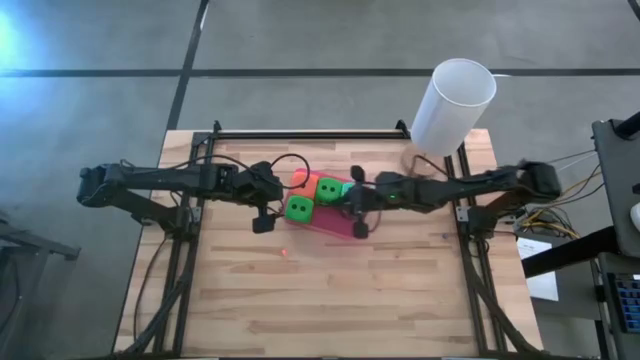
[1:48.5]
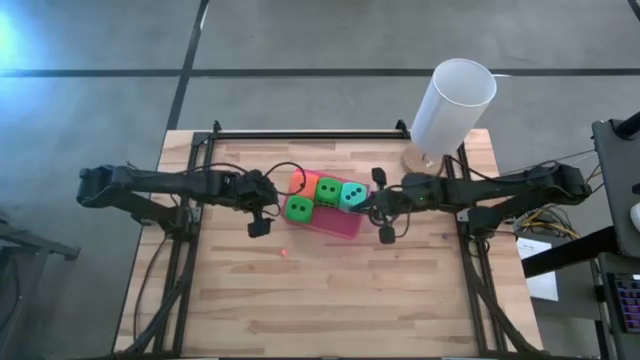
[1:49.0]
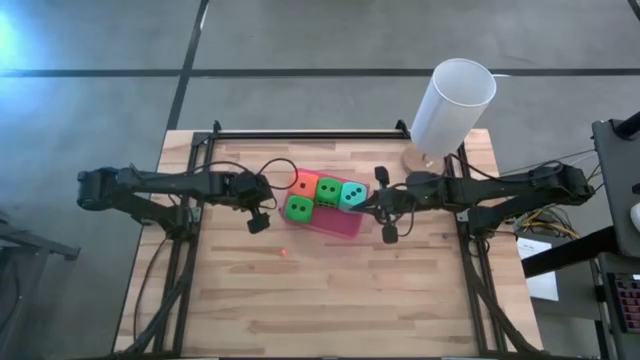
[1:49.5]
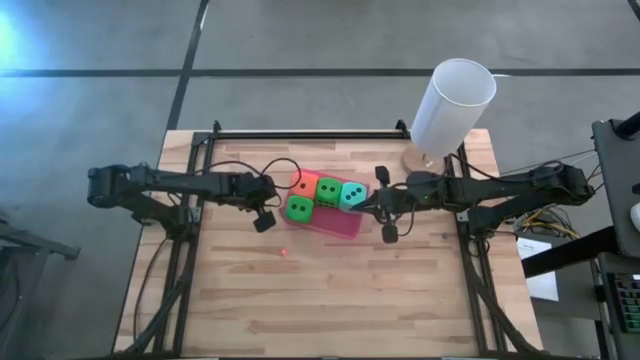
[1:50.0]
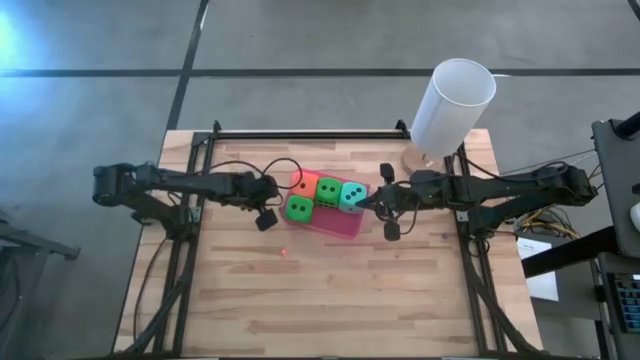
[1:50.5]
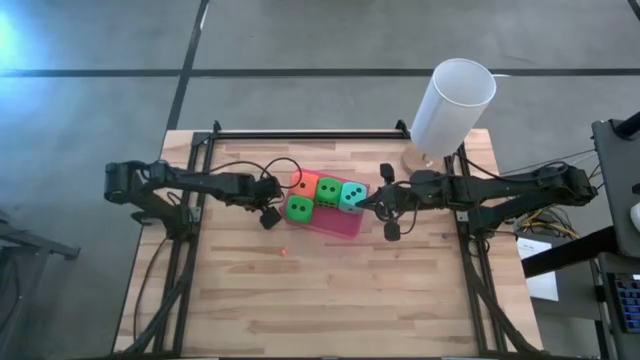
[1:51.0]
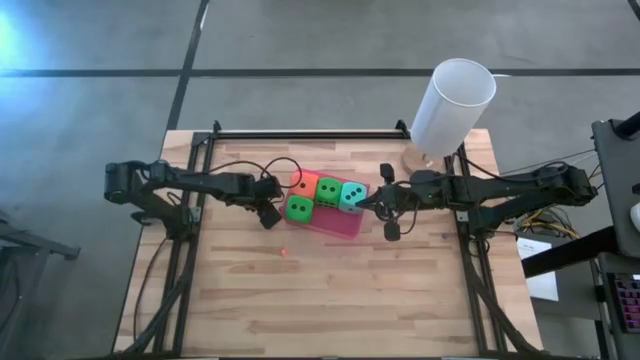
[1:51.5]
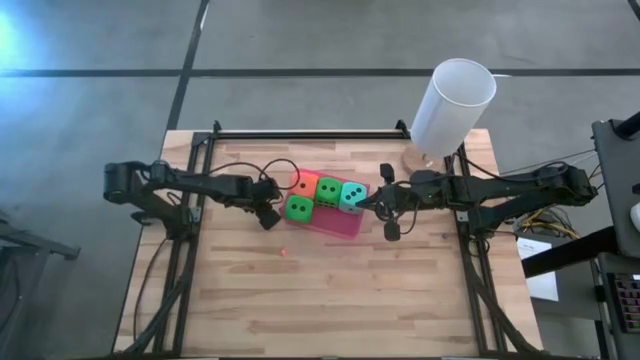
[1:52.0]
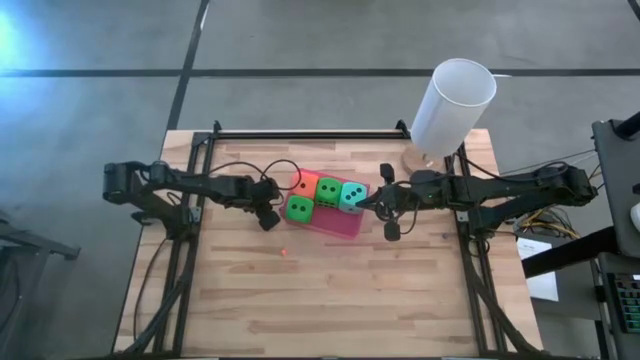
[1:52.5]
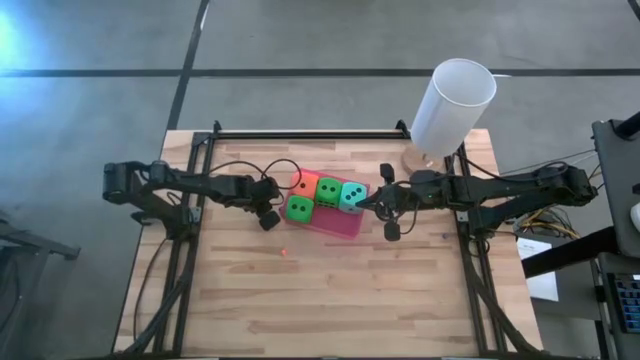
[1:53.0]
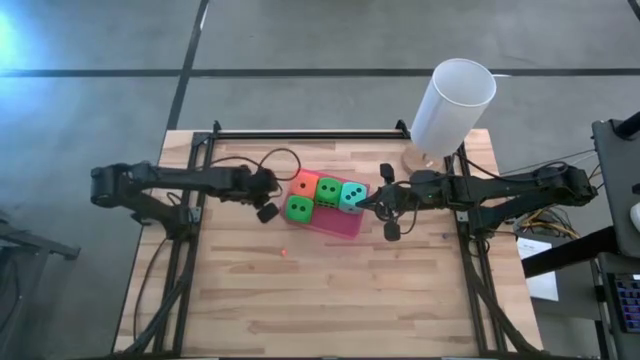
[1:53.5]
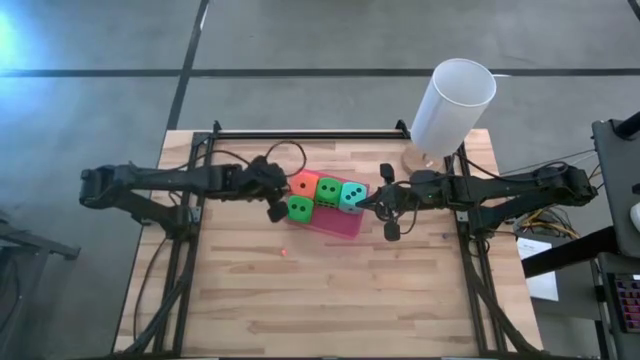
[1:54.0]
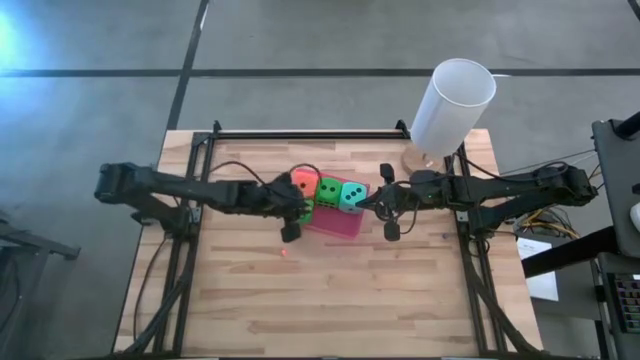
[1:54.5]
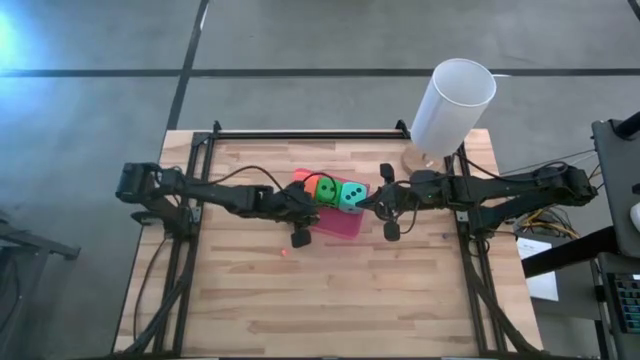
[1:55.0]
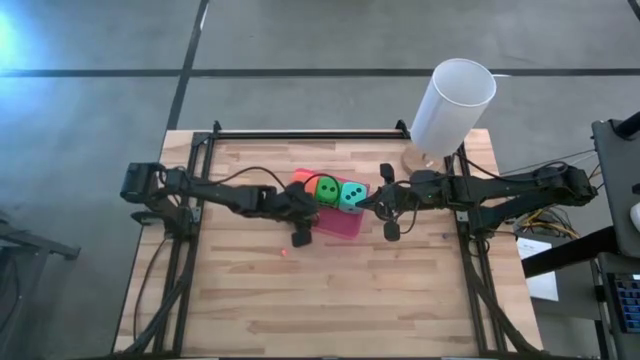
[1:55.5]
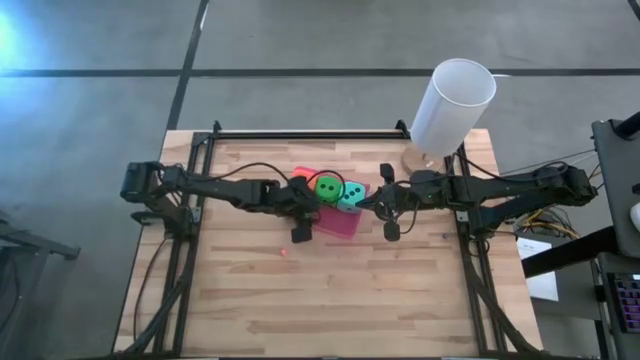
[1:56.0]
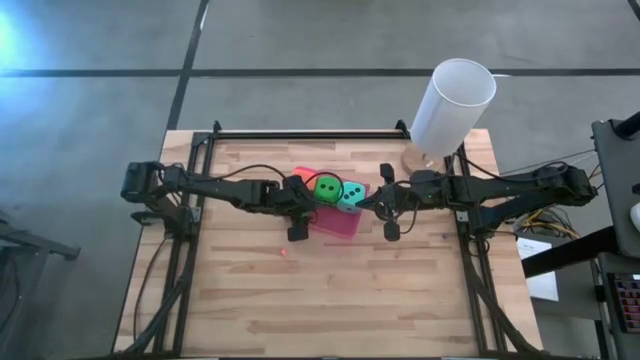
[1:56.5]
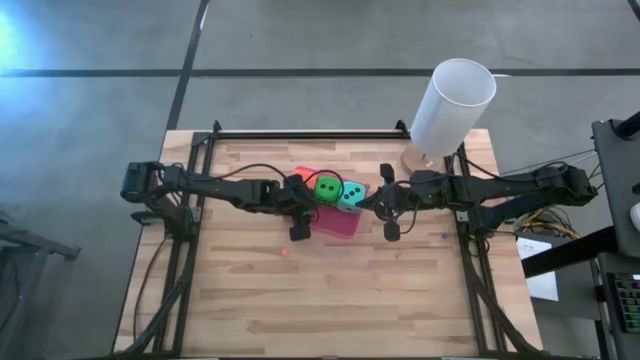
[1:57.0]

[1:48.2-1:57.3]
Task: Pick & Place Dice
Put the small yellow die into the pink bin

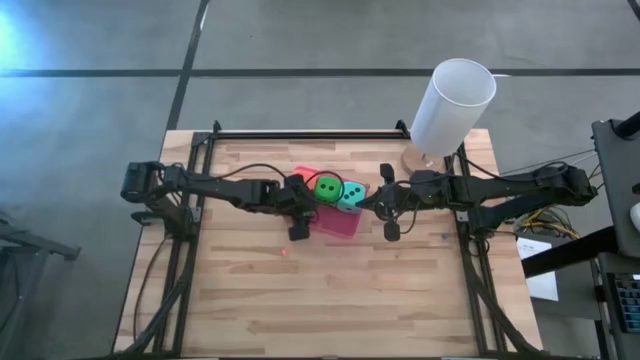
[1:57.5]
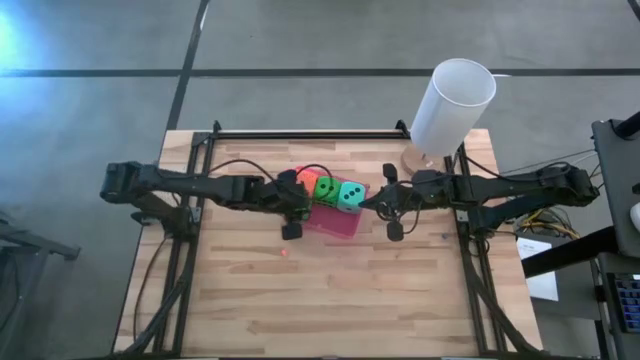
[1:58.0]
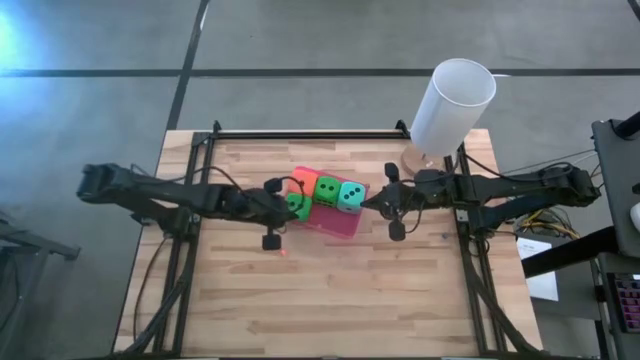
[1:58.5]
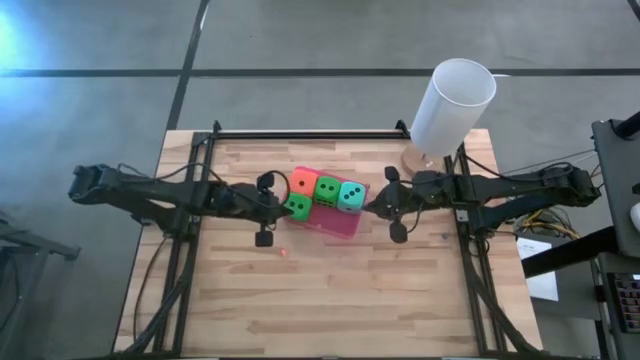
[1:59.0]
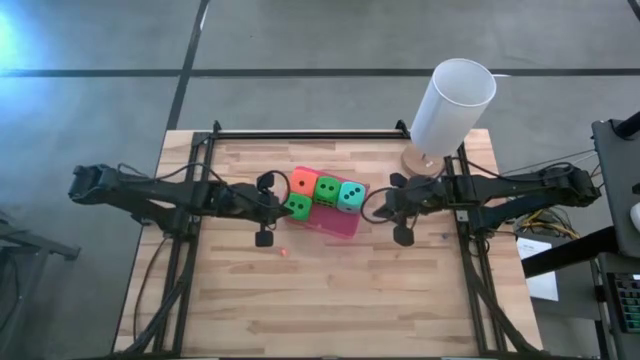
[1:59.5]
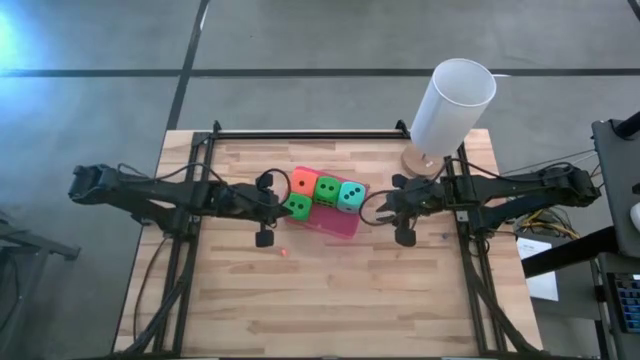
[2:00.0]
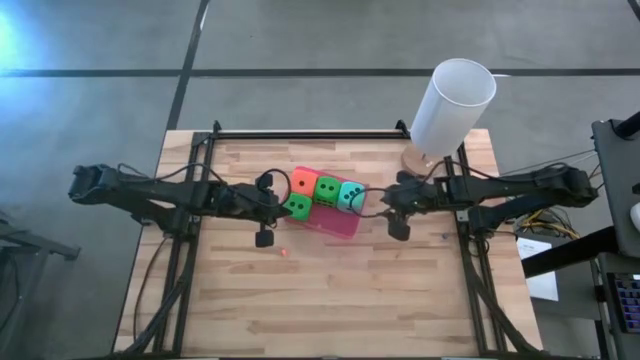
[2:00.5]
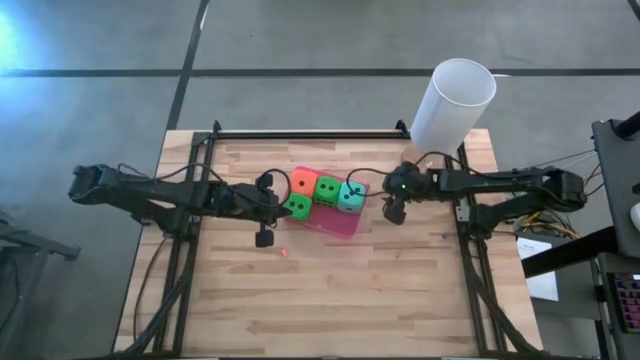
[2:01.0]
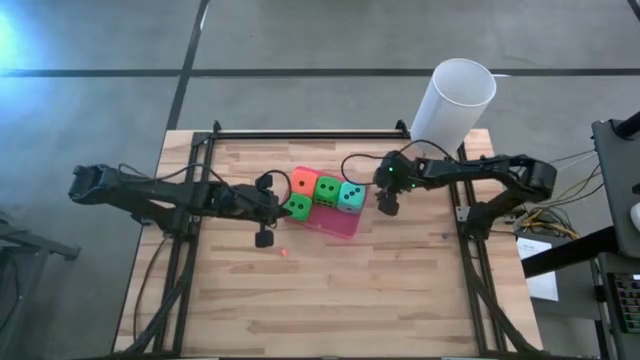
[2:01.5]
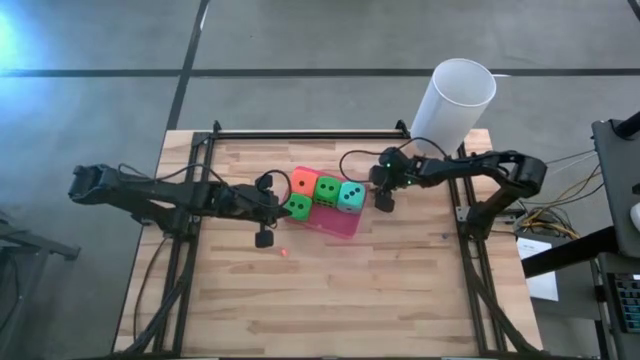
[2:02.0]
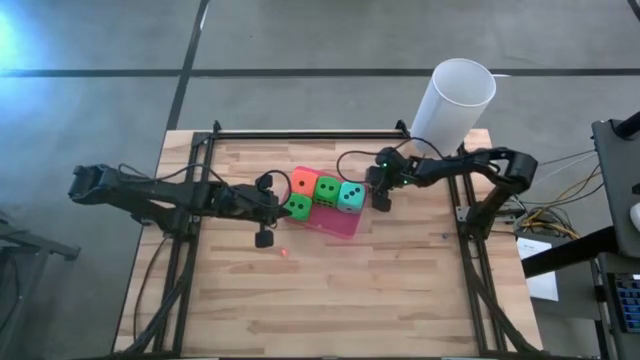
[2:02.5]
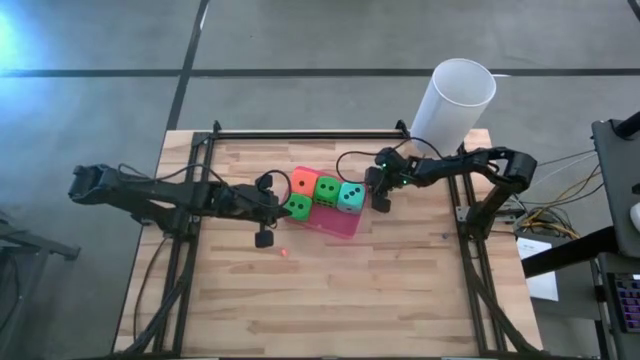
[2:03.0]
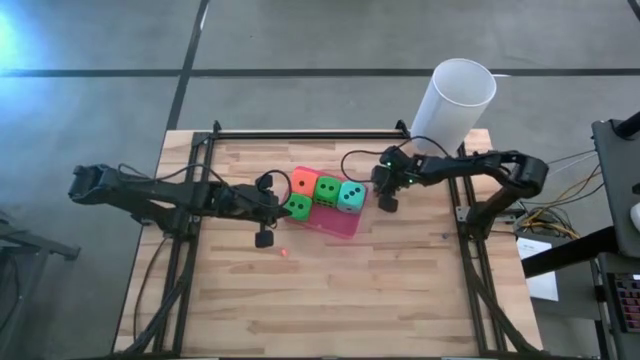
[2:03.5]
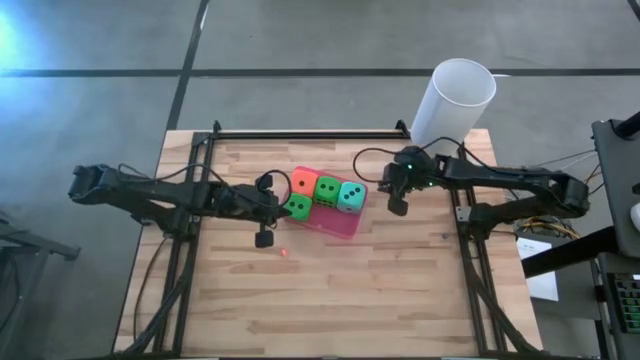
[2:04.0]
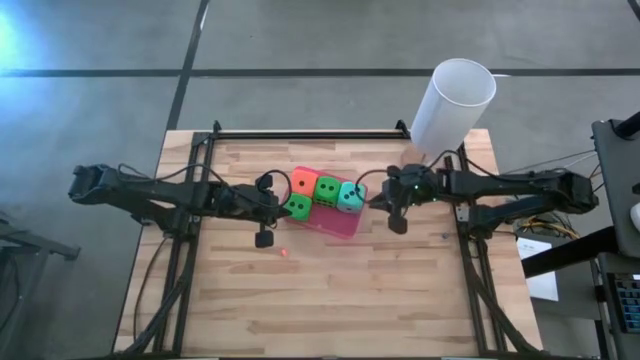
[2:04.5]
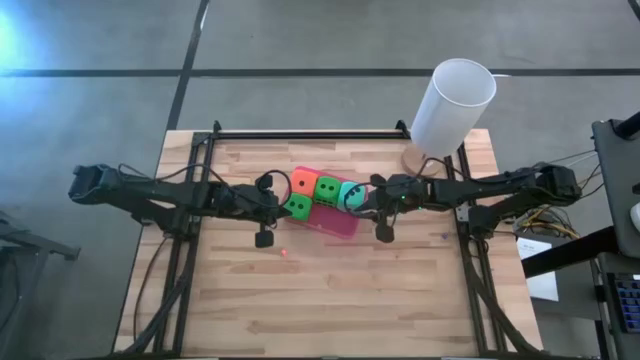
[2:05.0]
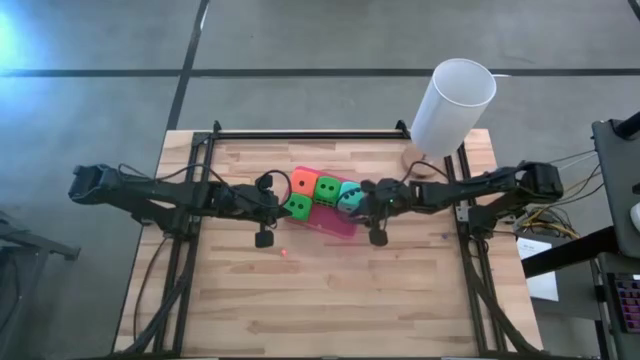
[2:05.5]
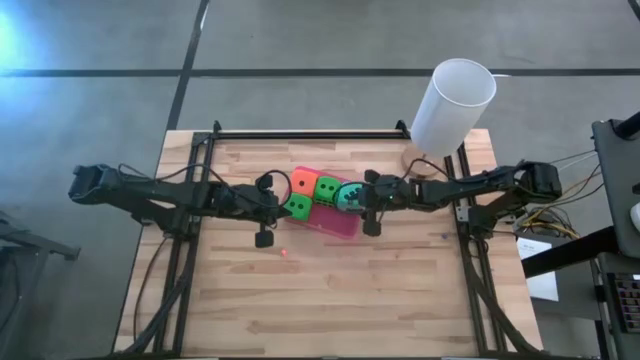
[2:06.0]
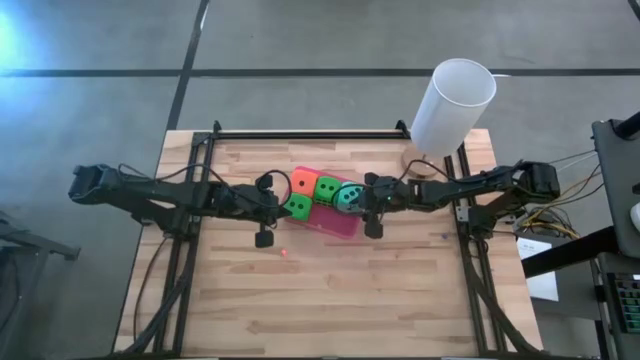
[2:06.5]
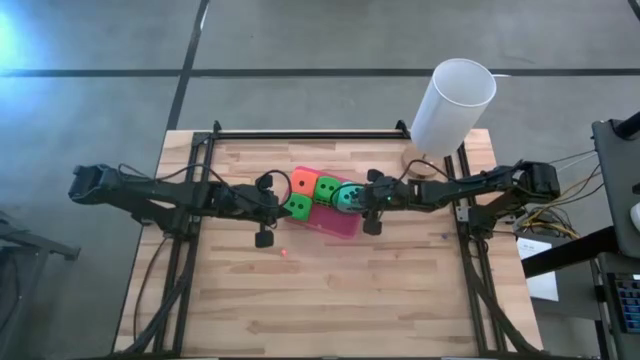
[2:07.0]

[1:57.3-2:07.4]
Put the right small black die into the pink bin

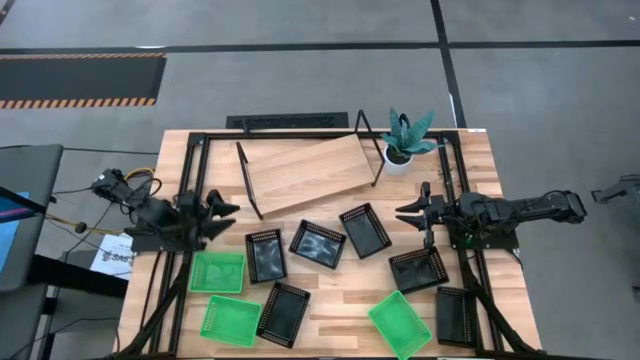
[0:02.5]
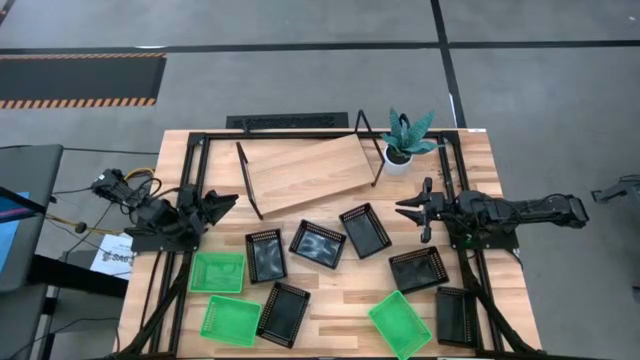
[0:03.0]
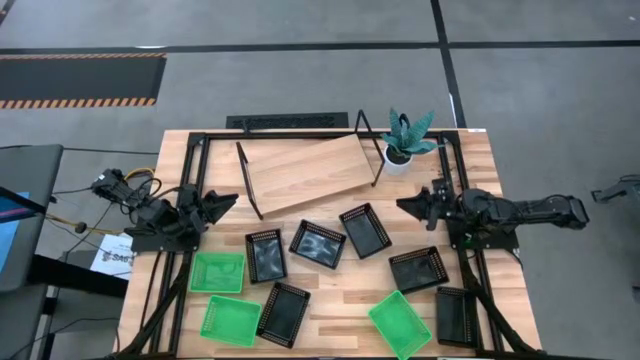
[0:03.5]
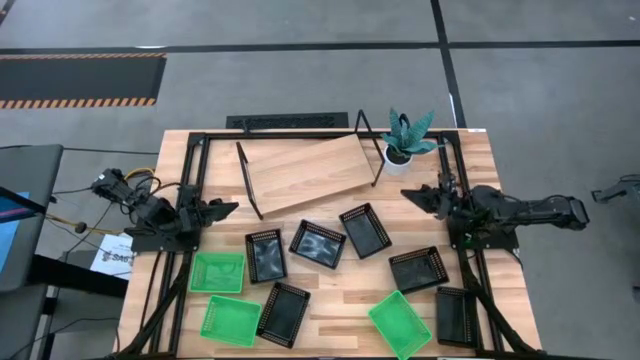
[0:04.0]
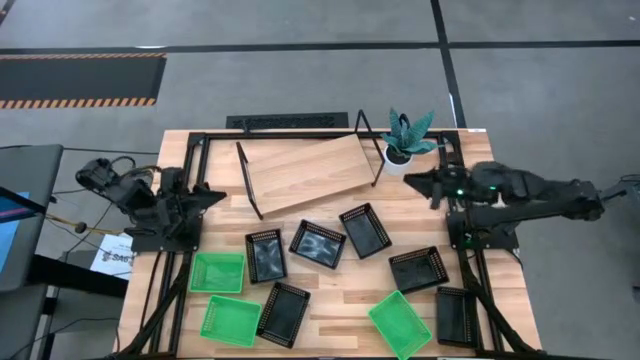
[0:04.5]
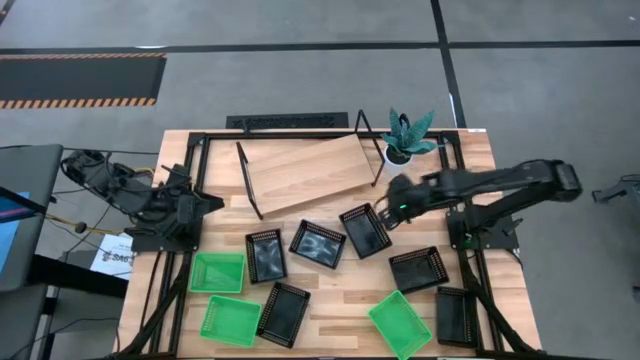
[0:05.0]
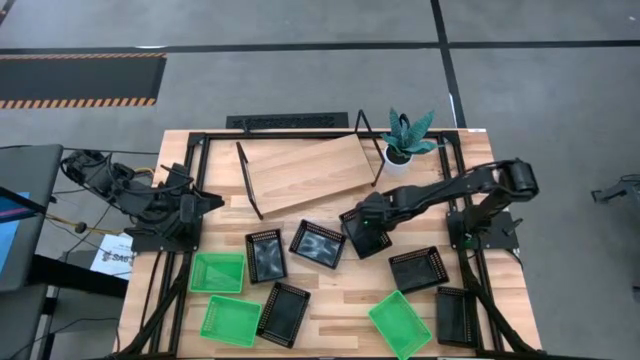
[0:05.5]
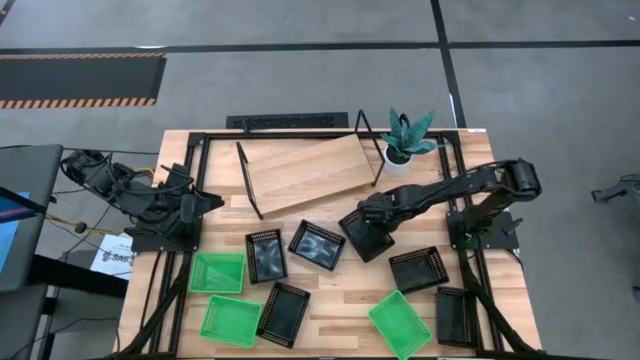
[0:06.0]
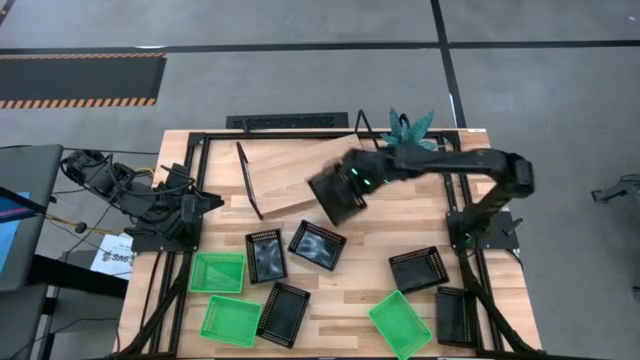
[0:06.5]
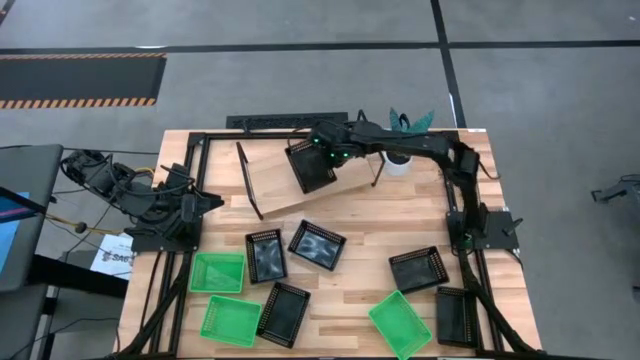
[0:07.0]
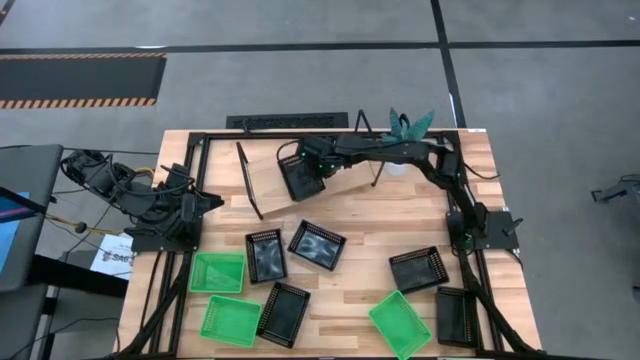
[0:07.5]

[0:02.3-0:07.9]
Task: Stack baskets on shelf by color
Put the black bin on the shelf
